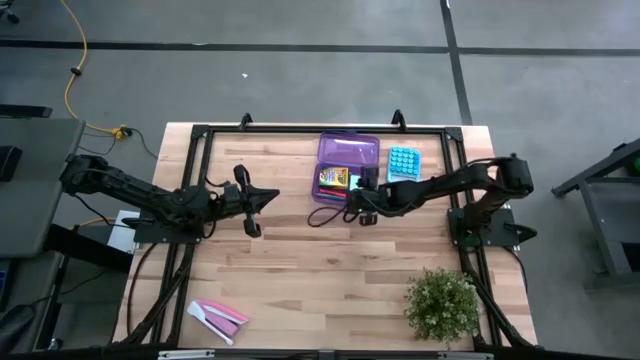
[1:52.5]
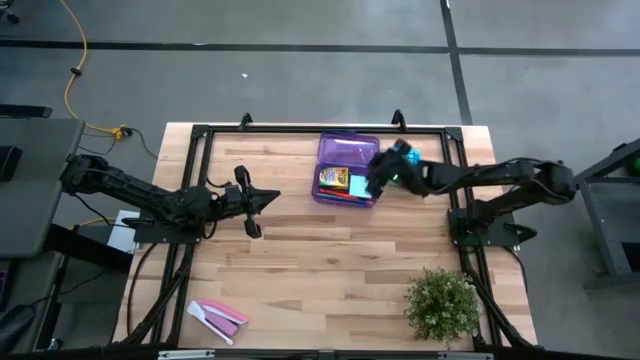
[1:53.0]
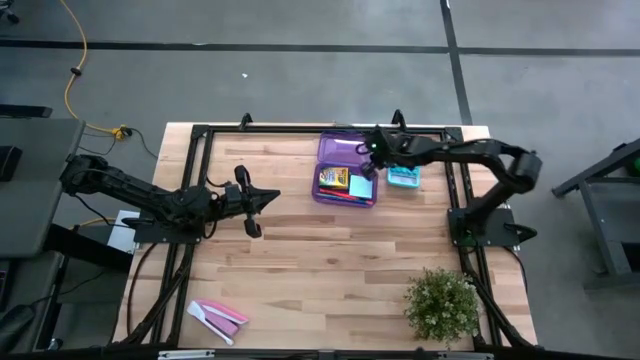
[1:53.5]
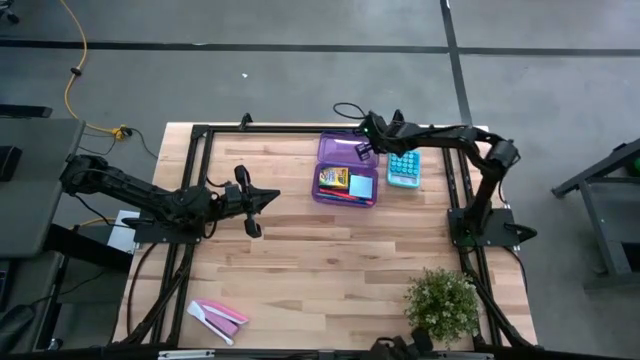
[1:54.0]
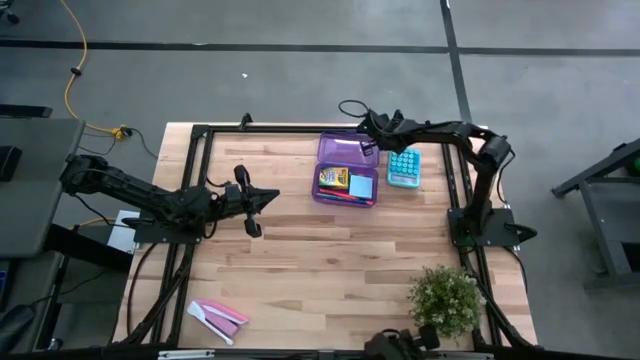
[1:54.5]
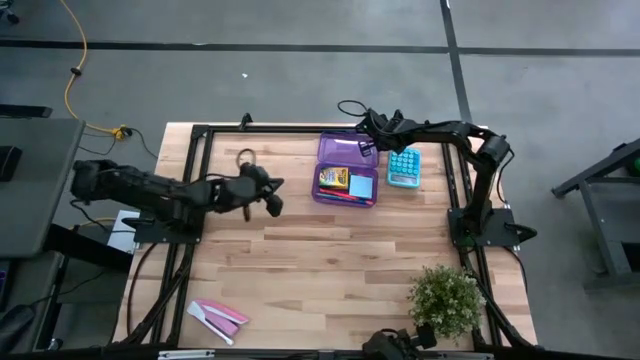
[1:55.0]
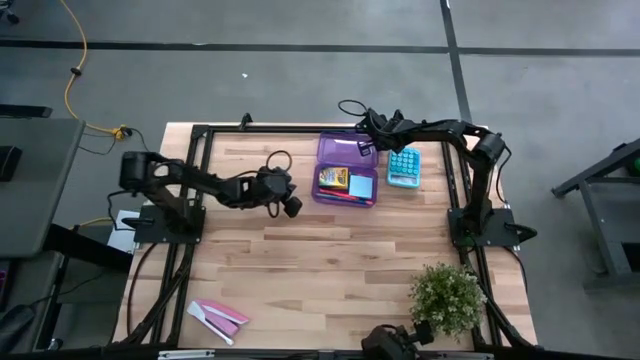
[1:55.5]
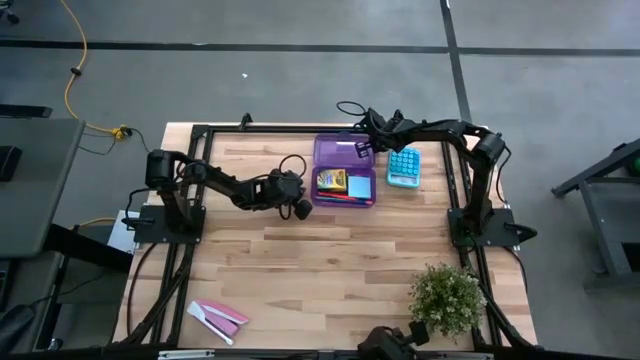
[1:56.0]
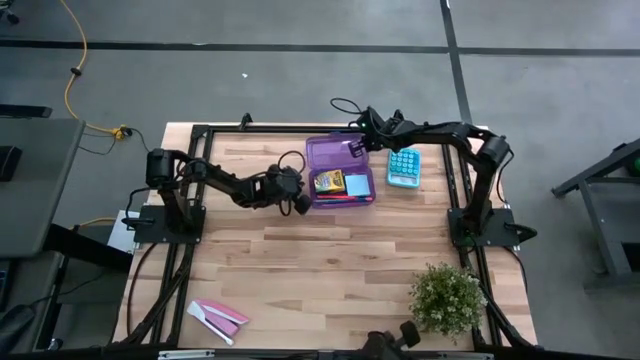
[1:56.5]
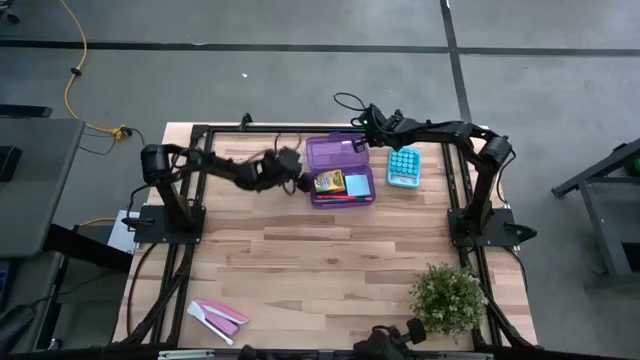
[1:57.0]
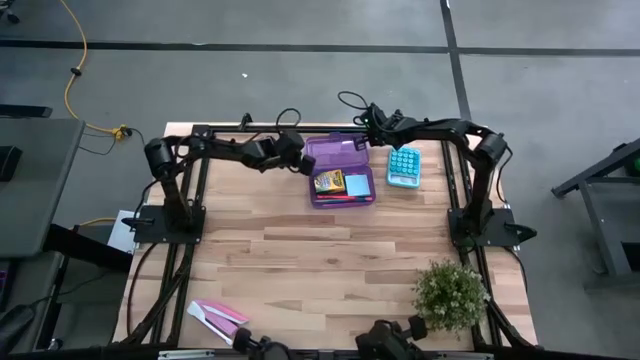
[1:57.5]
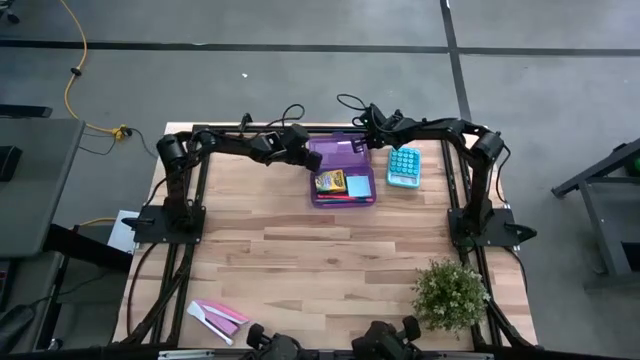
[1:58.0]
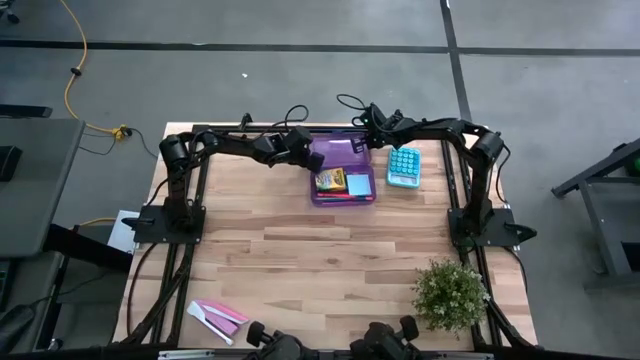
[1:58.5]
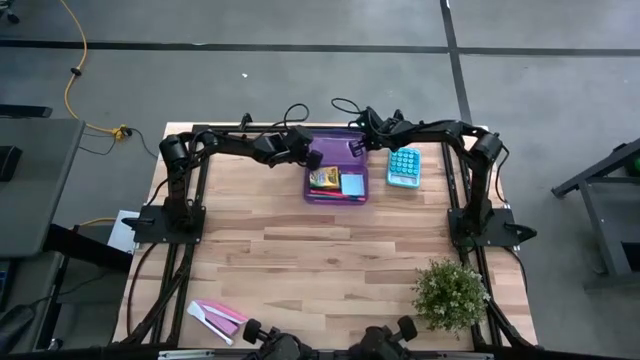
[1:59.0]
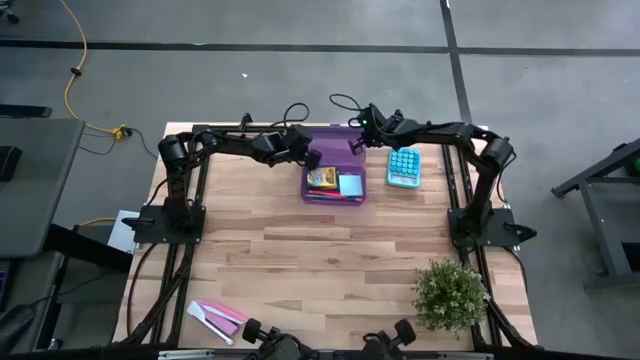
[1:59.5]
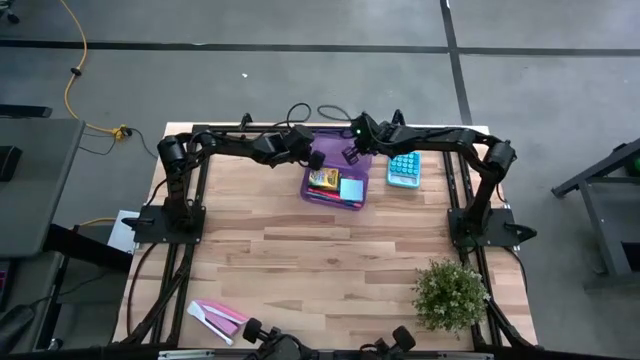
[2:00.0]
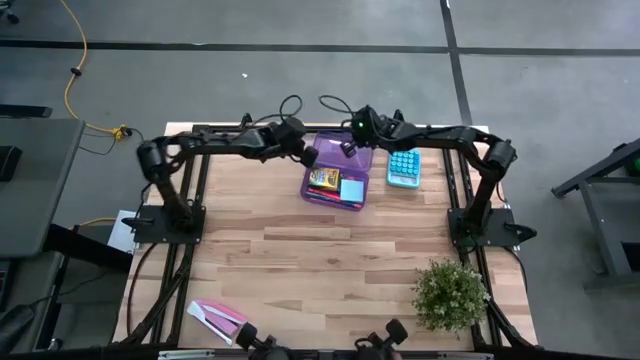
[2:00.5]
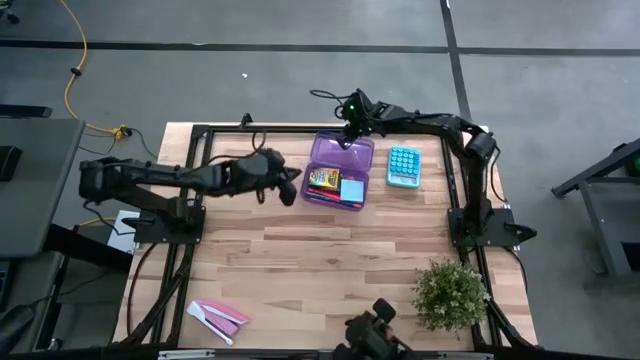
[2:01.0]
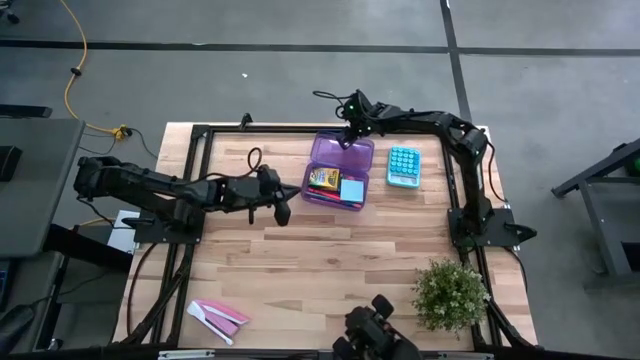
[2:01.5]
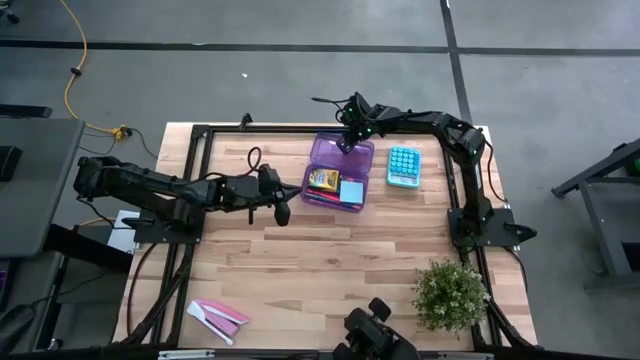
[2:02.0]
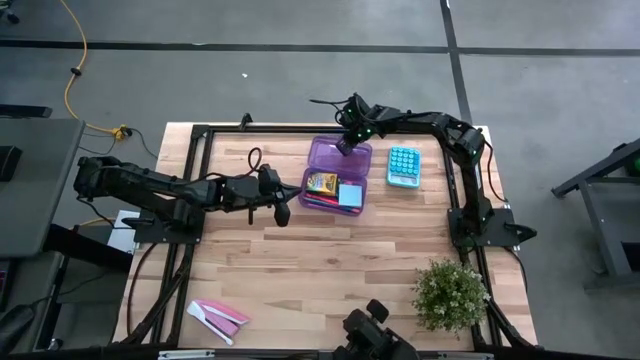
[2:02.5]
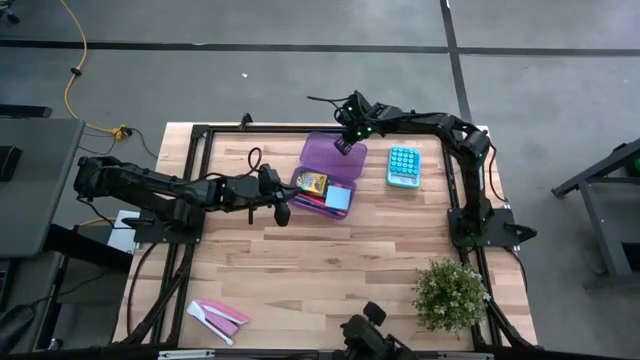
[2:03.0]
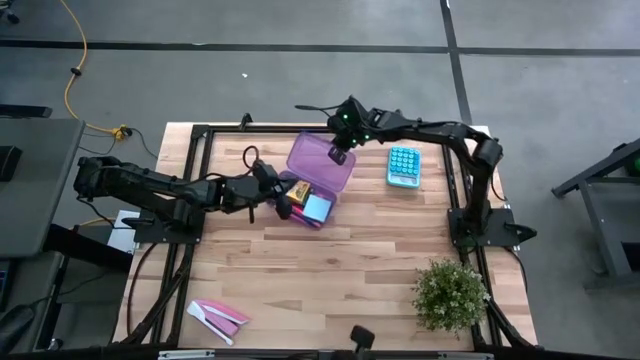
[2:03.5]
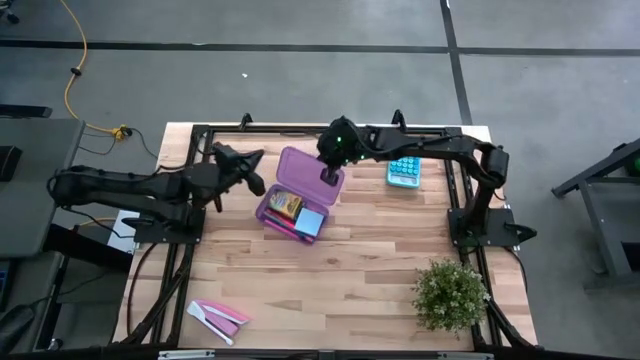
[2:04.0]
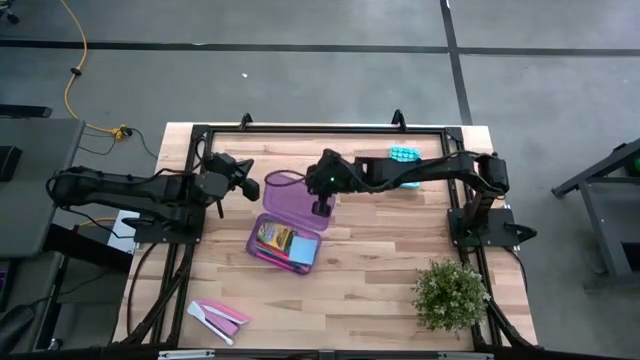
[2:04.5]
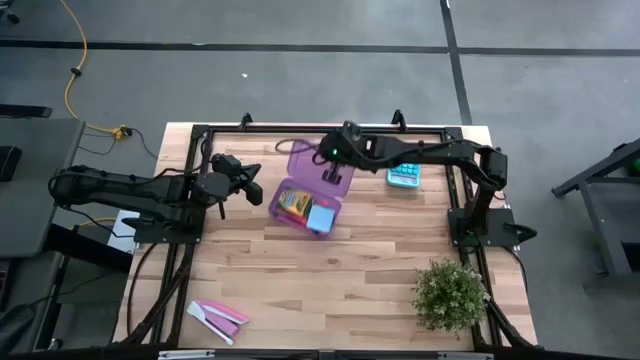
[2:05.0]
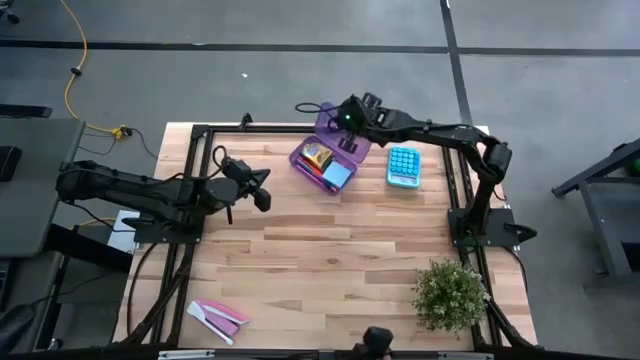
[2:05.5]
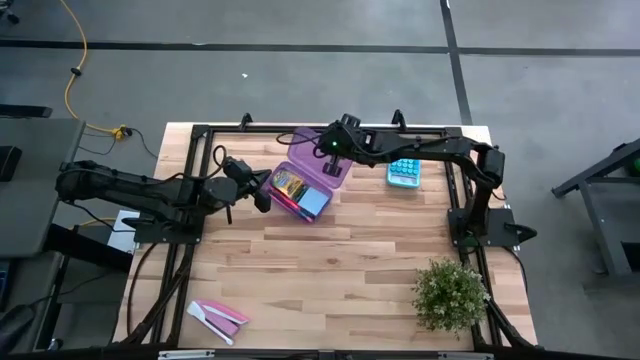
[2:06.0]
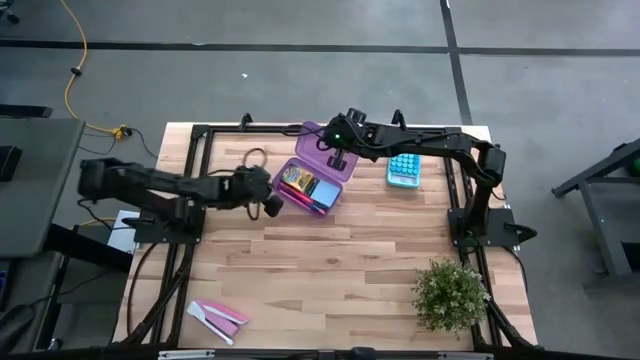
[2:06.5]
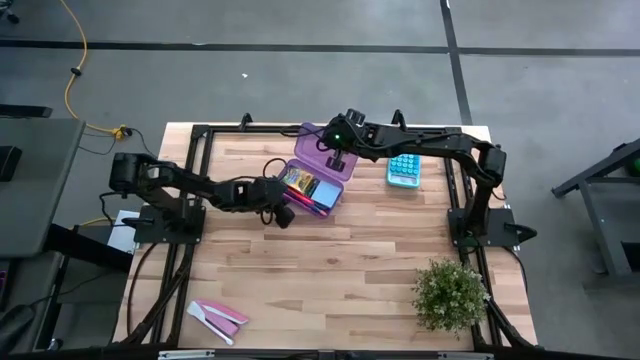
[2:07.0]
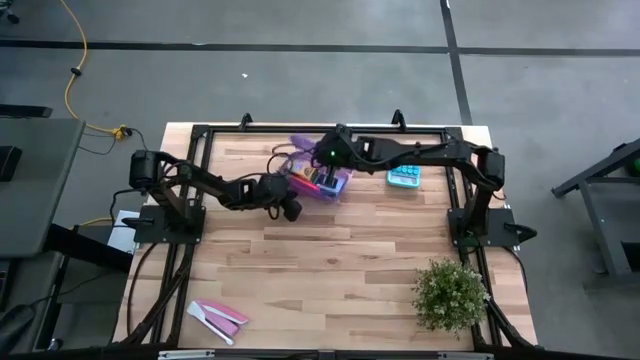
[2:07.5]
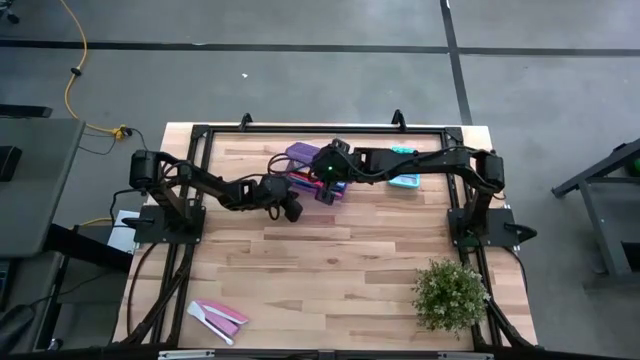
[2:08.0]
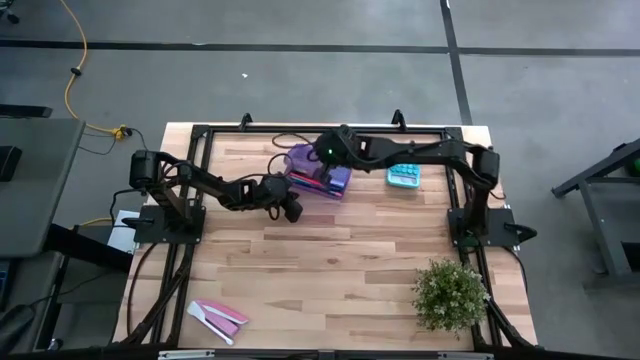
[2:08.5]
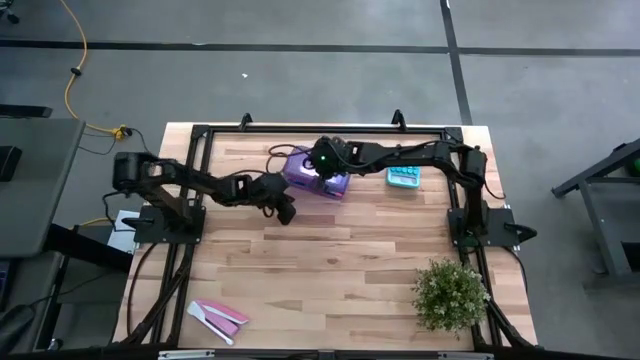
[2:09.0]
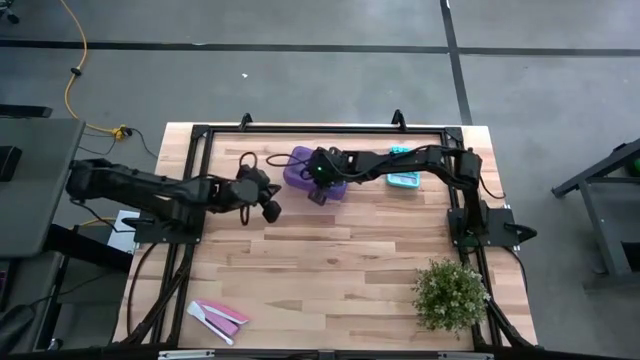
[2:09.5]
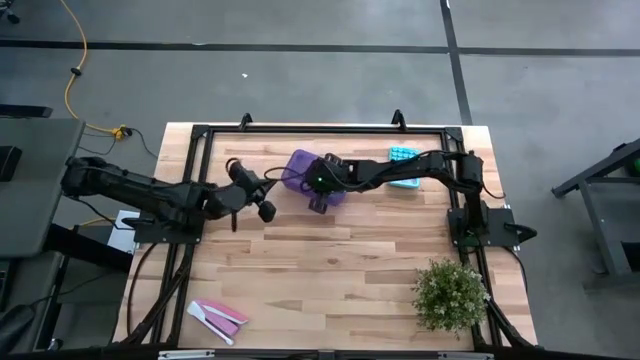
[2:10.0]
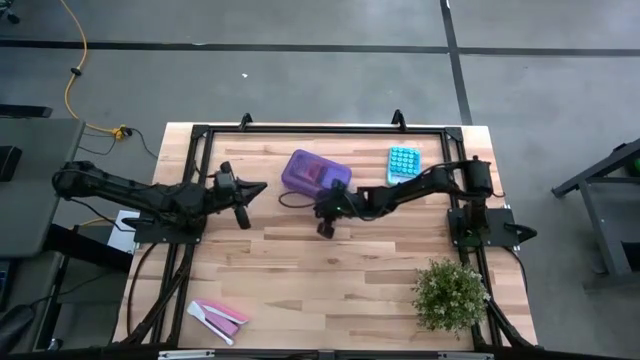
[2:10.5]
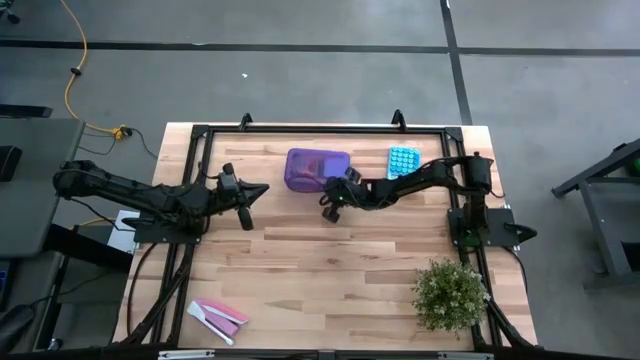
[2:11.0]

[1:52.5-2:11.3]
Task: Pack school essentials
Close the violet supply box
